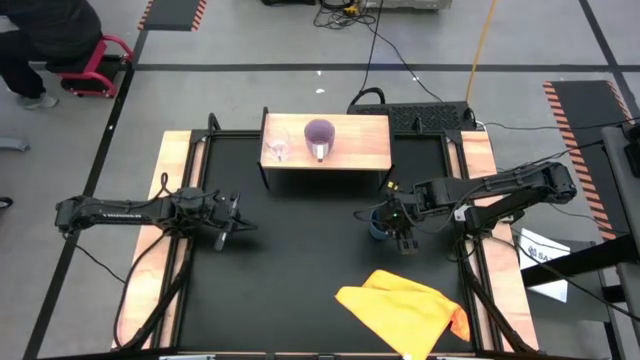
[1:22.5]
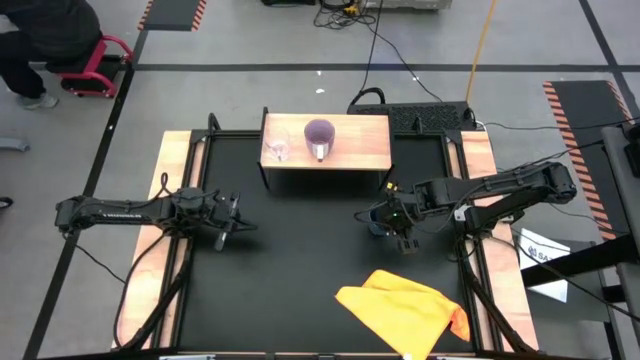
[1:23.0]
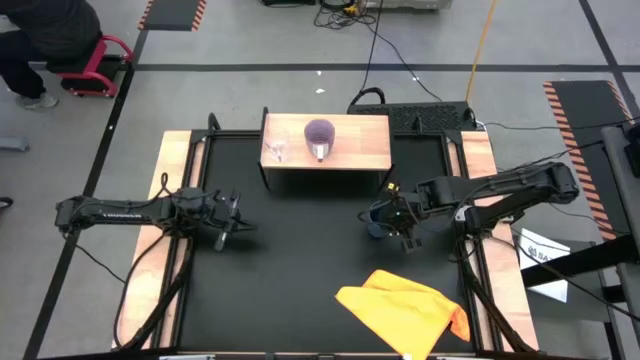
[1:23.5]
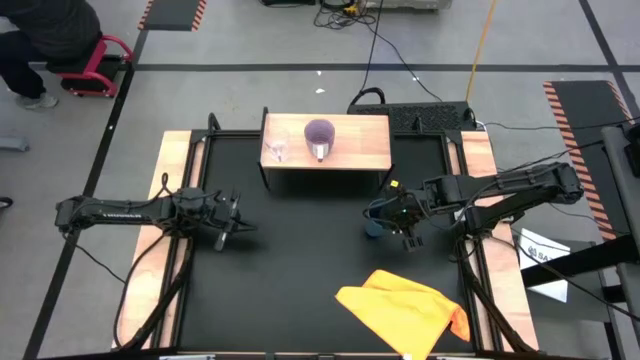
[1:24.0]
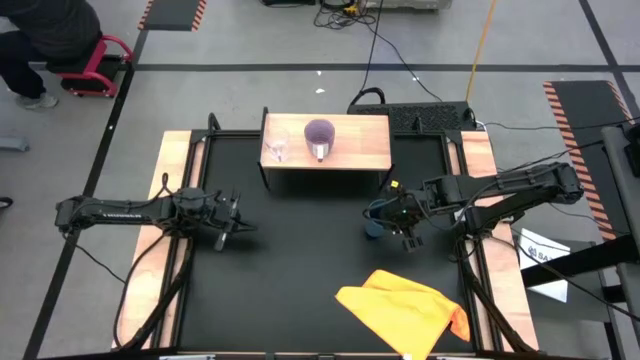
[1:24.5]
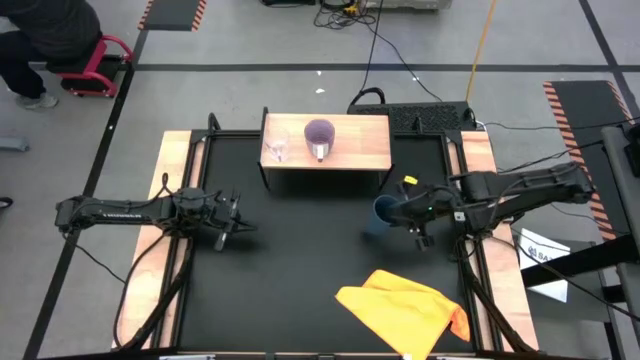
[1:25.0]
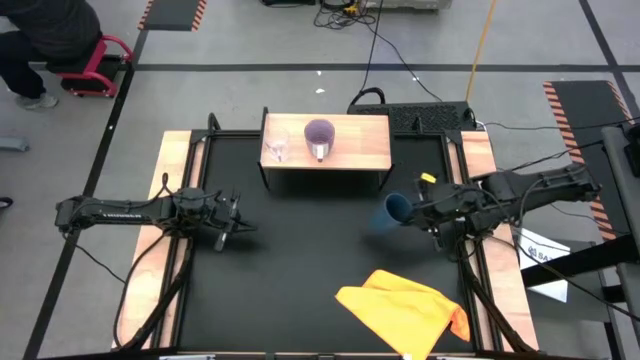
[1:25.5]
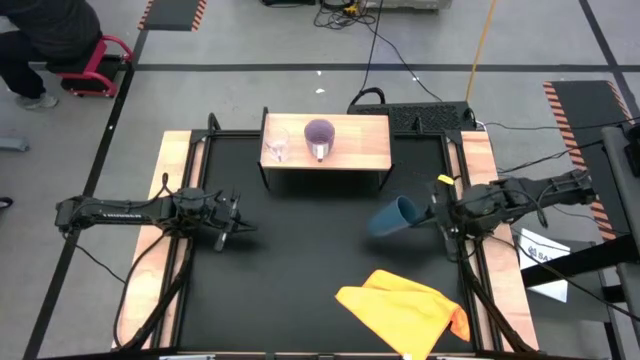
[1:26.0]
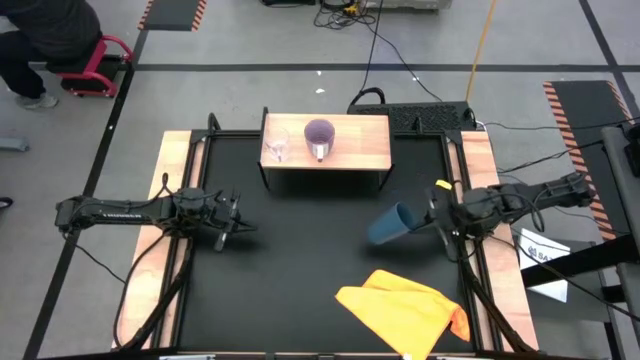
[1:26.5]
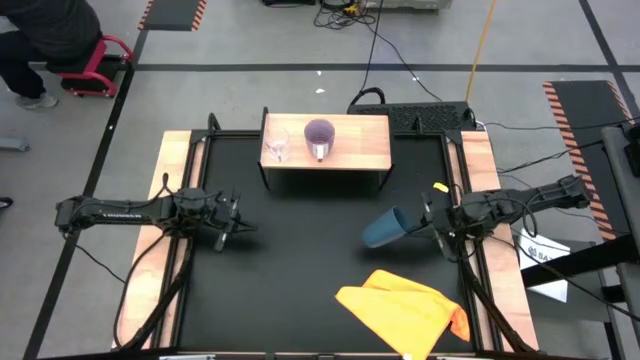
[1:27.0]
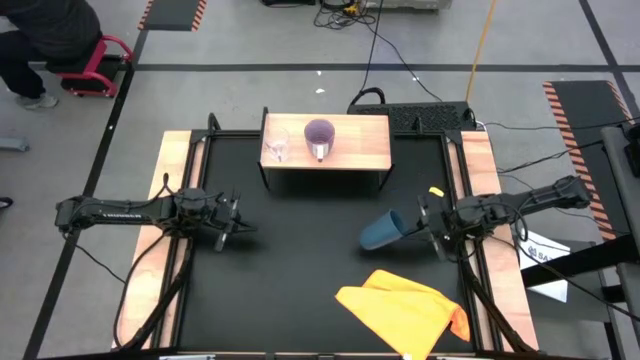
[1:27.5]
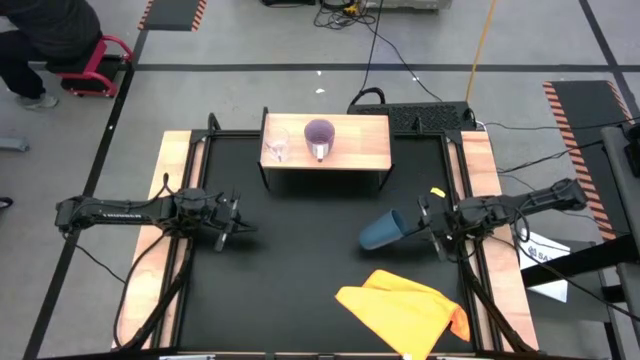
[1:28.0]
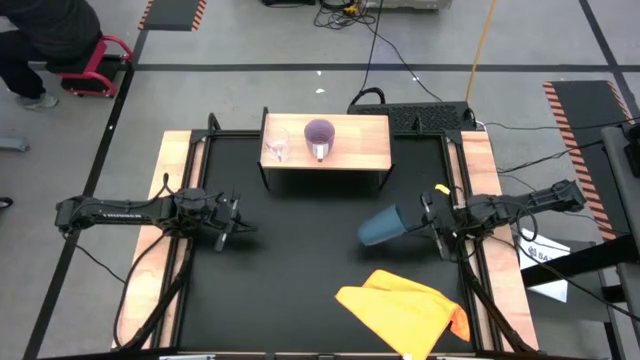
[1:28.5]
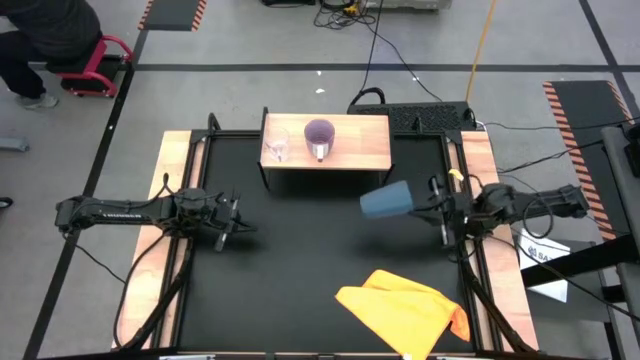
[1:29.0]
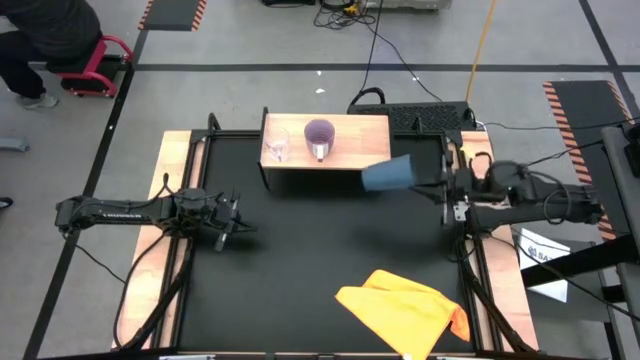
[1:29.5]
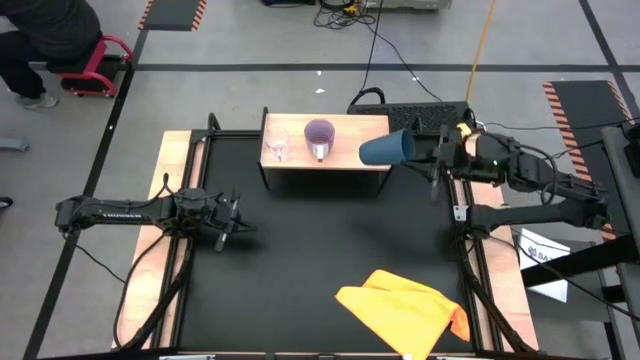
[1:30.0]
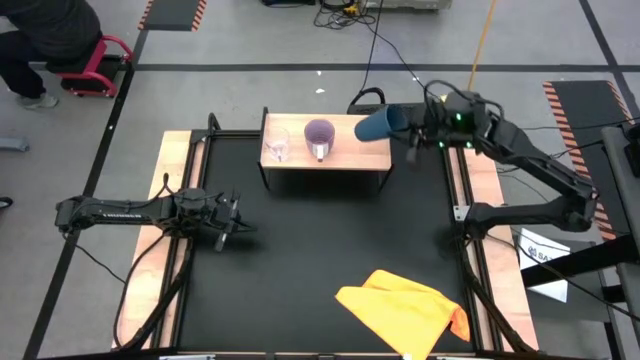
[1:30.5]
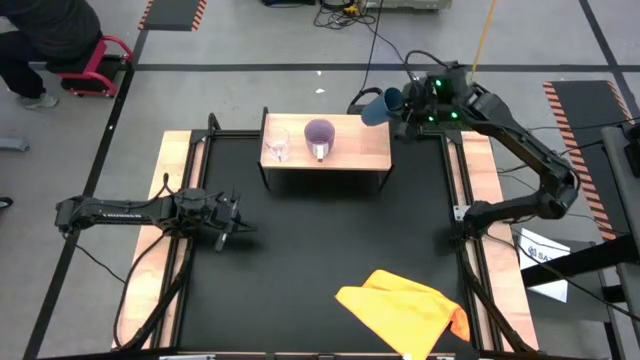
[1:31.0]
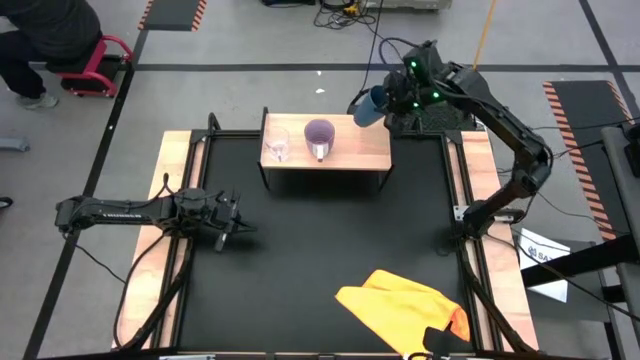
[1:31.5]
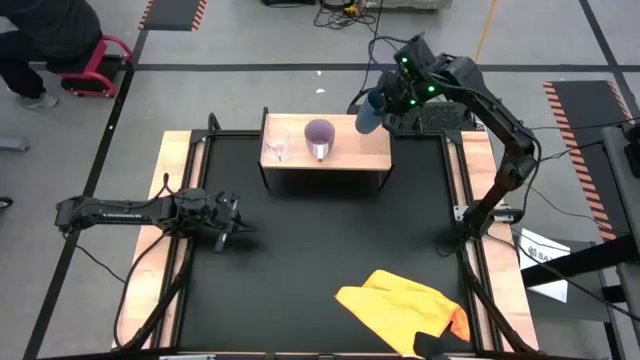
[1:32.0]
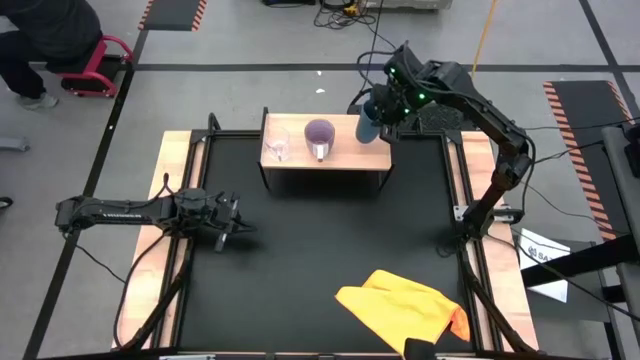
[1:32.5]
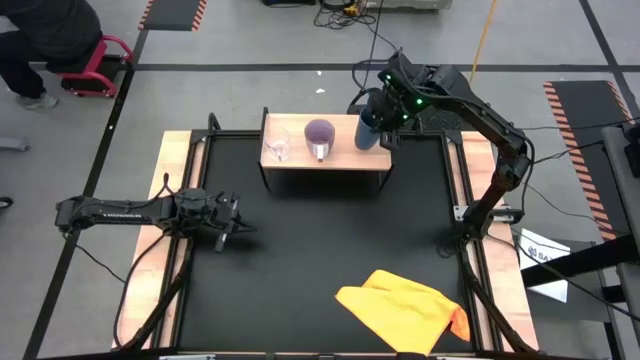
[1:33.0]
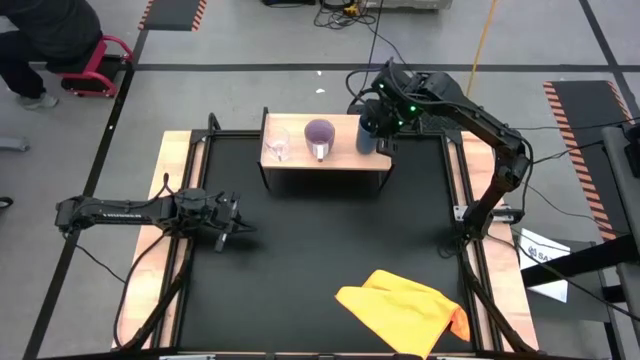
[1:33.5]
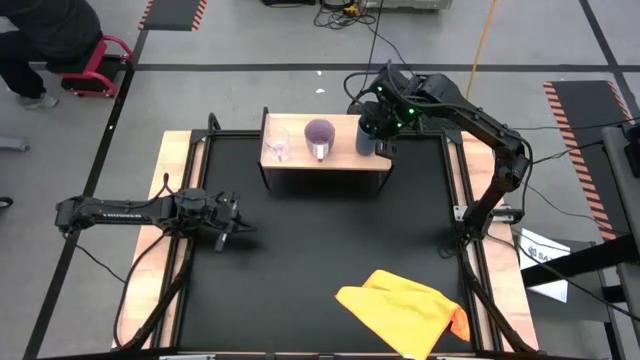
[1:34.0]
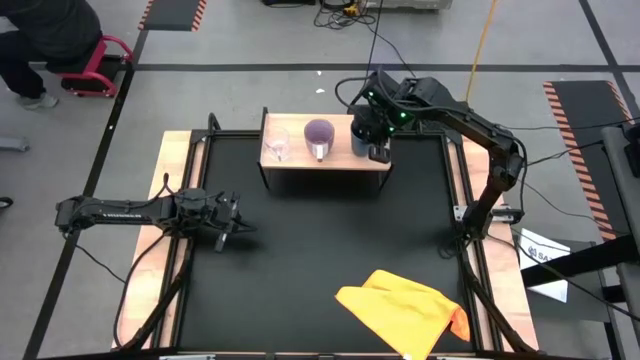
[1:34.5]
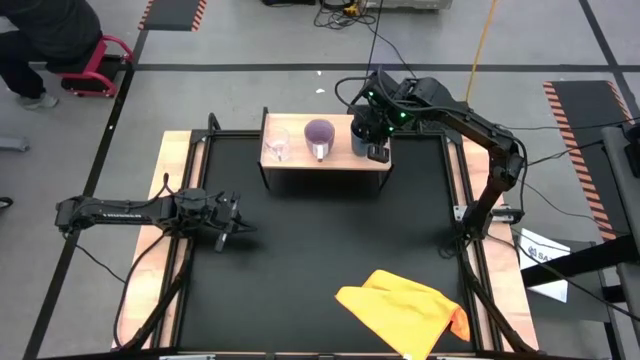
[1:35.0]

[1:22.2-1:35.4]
Task: Stack small to large cups/mugs on shelf
Put the dark blue cup on the shelf

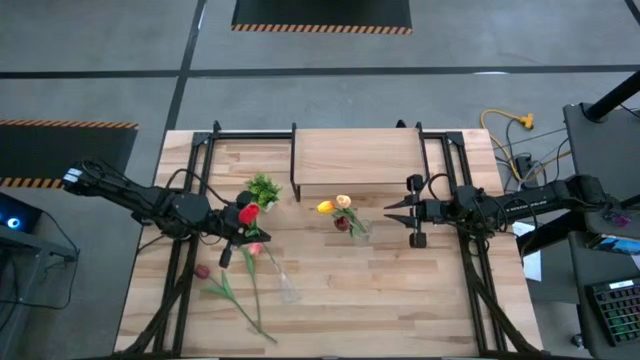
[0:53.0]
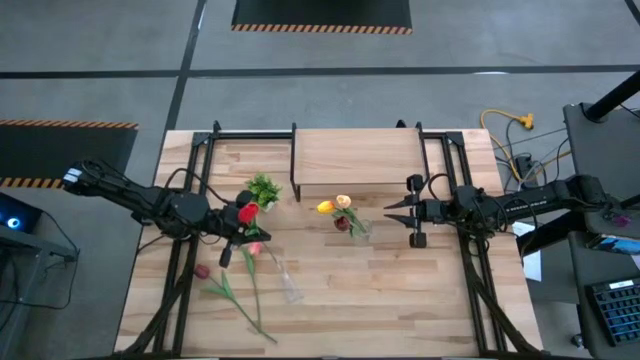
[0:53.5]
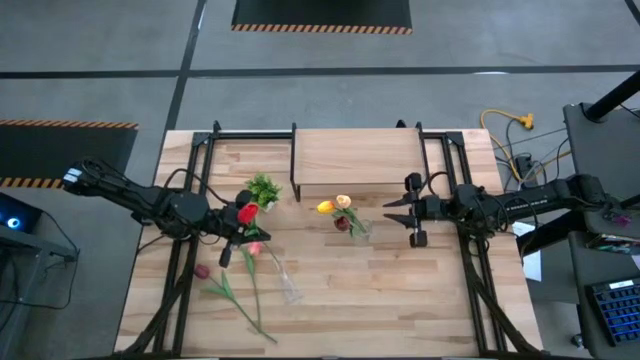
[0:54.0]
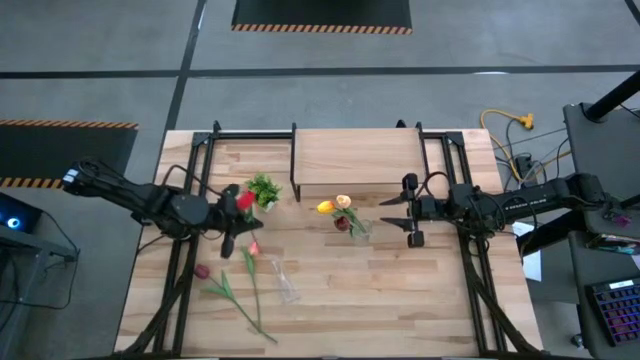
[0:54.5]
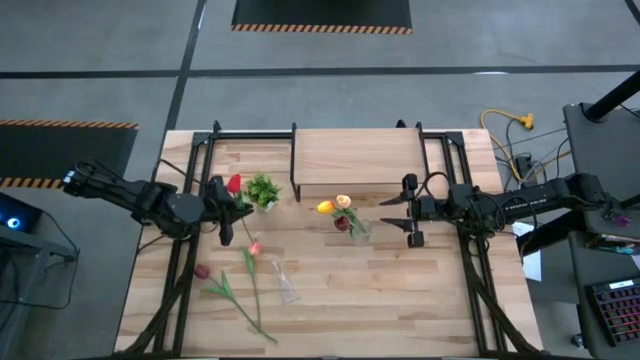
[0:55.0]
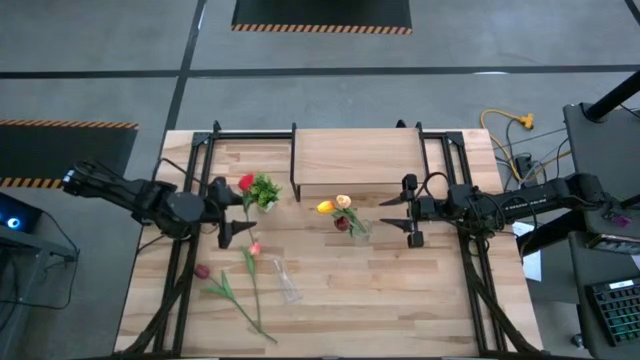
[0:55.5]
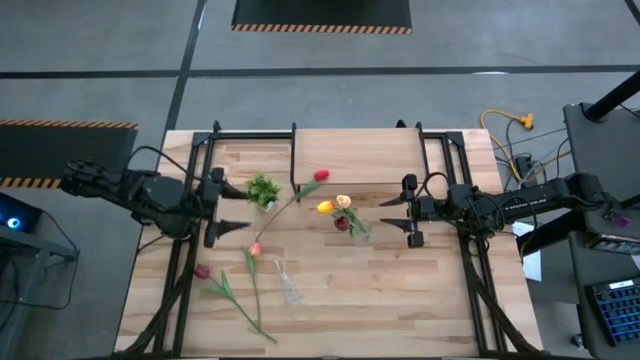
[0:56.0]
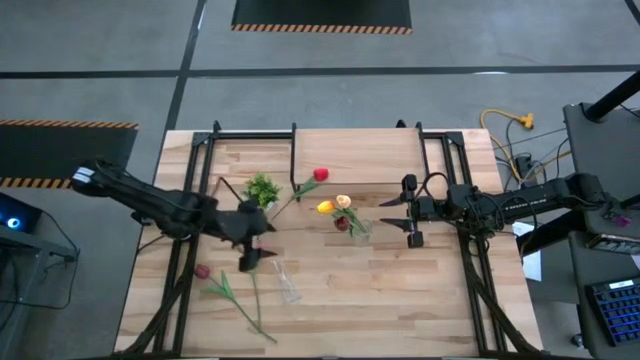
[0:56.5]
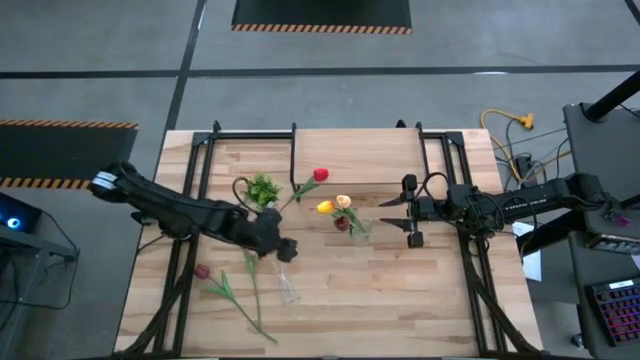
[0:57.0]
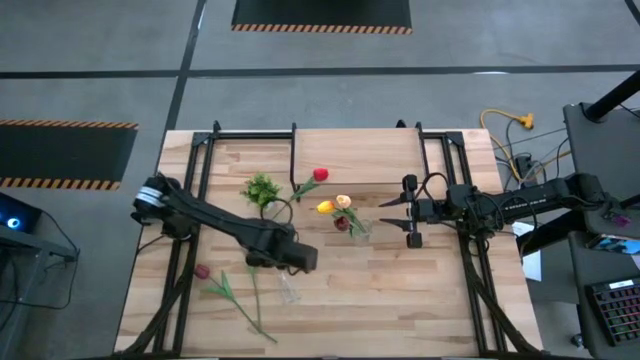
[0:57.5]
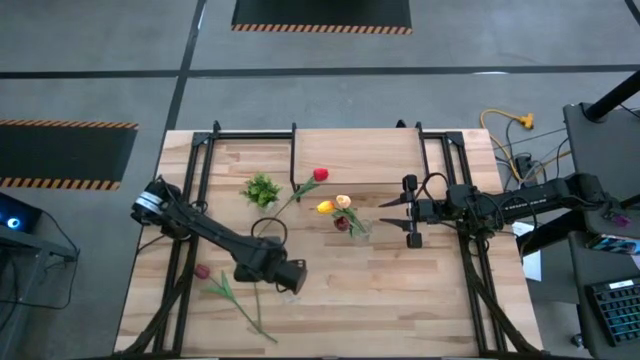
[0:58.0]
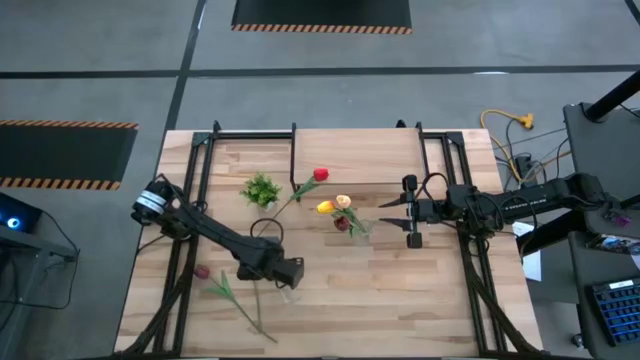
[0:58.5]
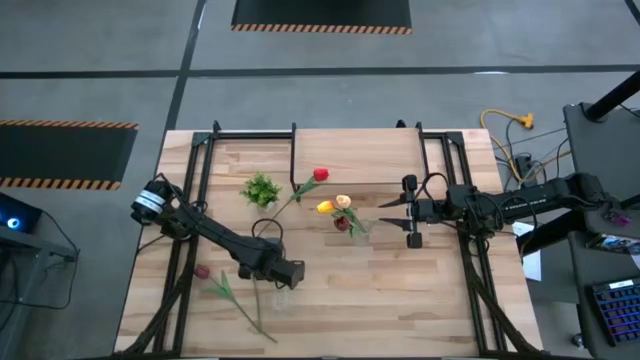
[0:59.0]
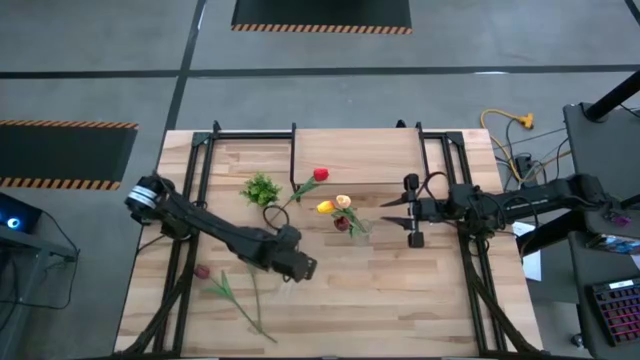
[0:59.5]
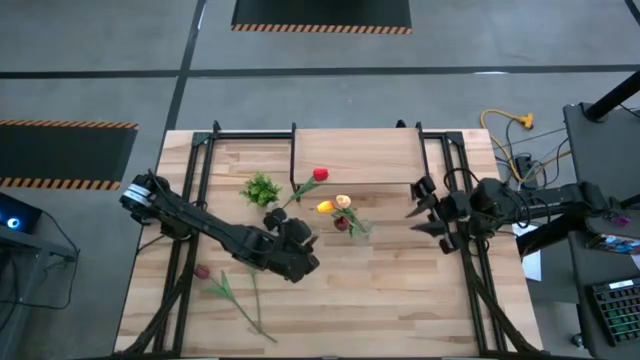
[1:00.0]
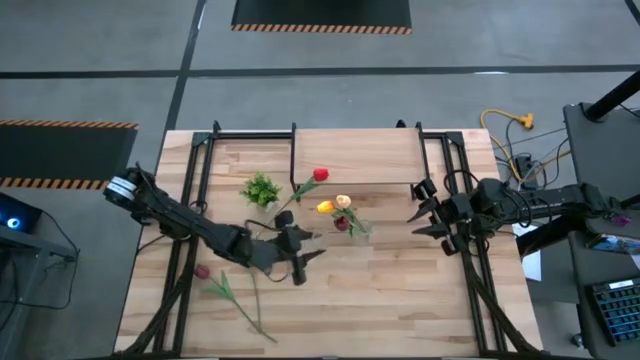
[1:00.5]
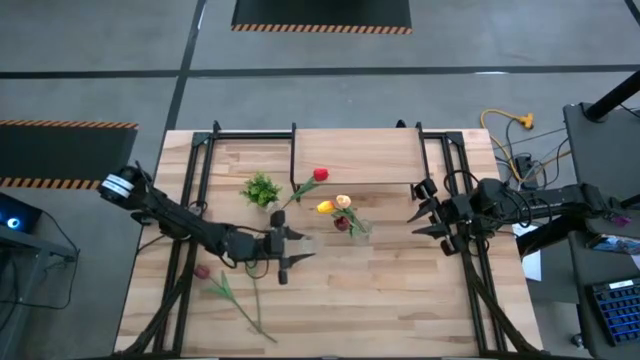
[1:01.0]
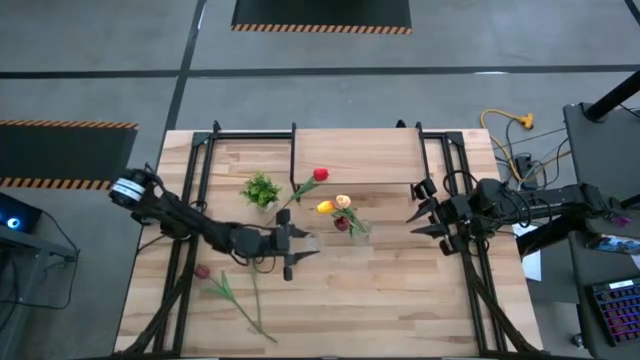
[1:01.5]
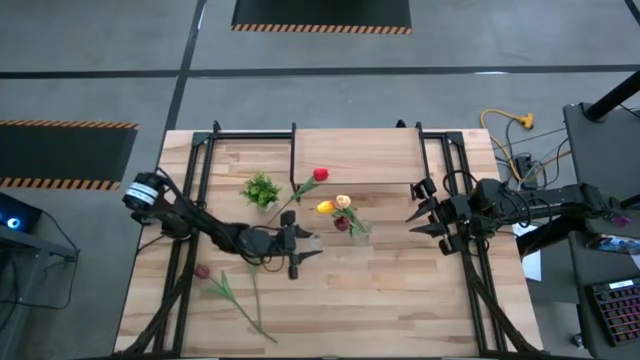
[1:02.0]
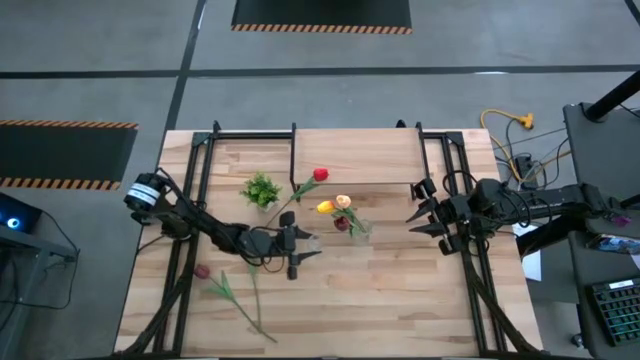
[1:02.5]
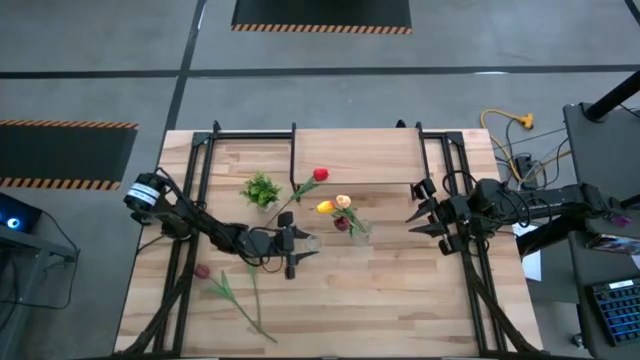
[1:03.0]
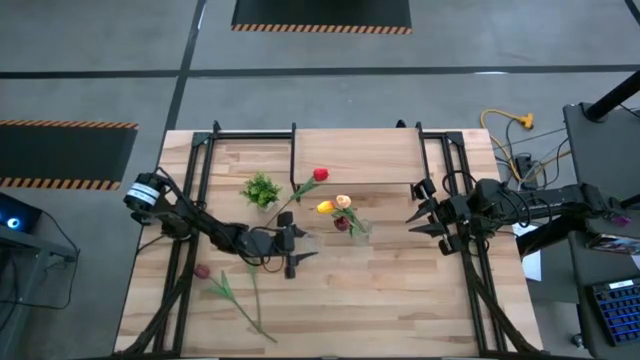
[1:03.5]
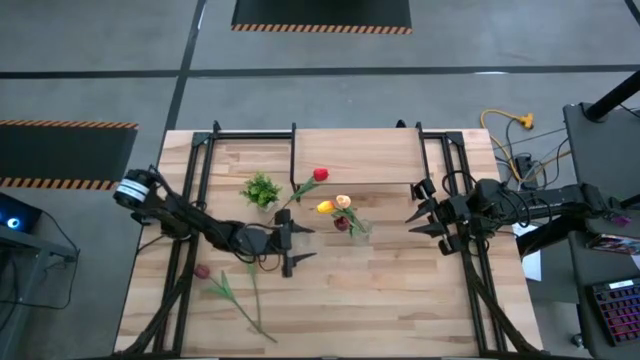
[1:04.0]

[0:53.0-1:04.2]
Task: Pick and place flowers into a vace then onto a shelf
Adjust the left transparent vase
